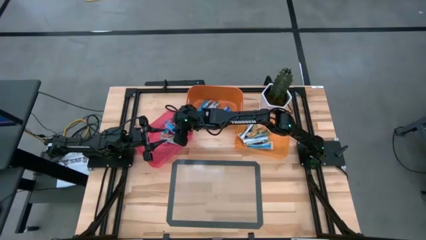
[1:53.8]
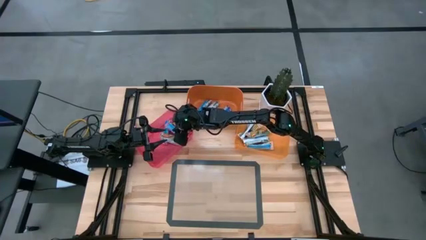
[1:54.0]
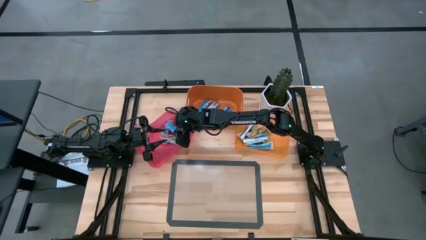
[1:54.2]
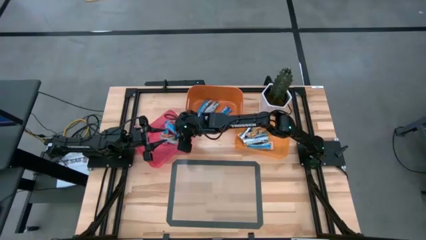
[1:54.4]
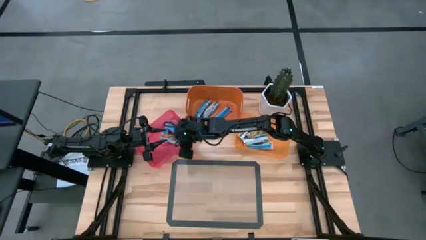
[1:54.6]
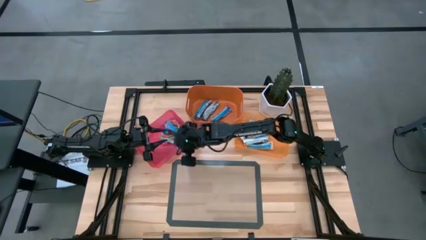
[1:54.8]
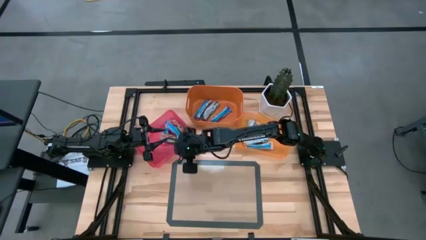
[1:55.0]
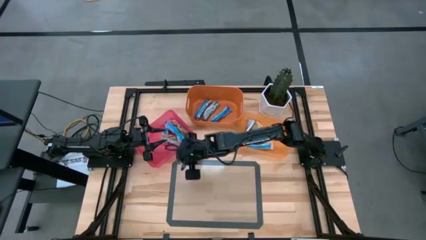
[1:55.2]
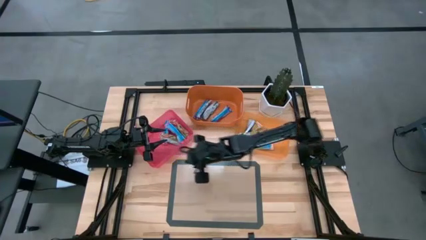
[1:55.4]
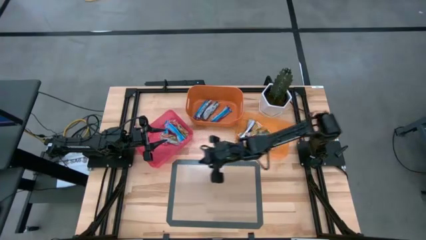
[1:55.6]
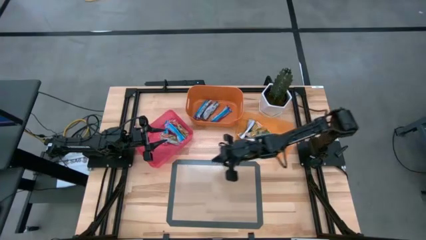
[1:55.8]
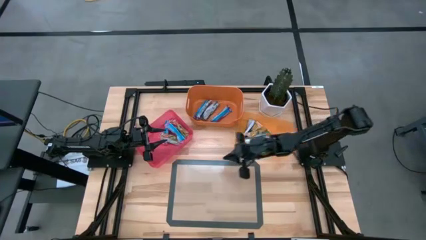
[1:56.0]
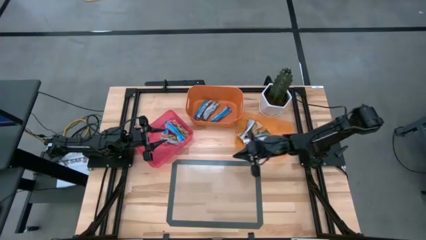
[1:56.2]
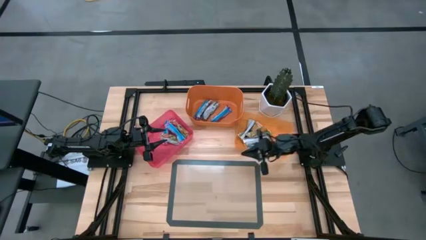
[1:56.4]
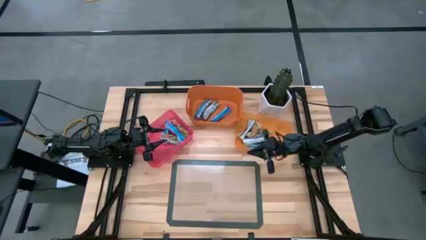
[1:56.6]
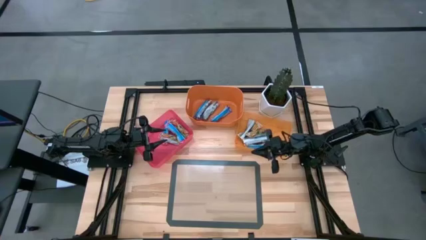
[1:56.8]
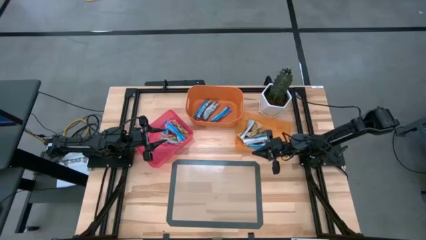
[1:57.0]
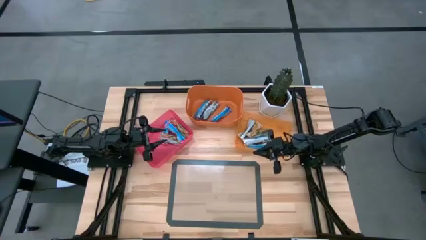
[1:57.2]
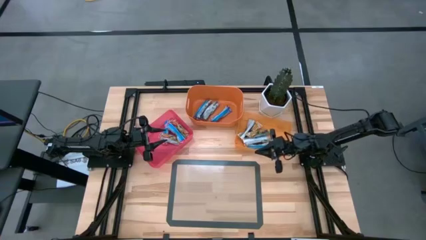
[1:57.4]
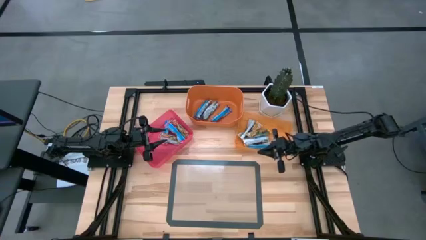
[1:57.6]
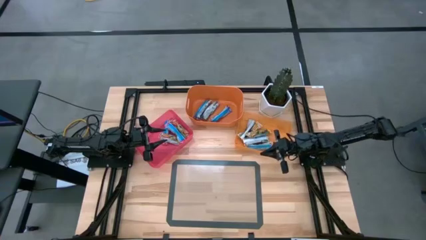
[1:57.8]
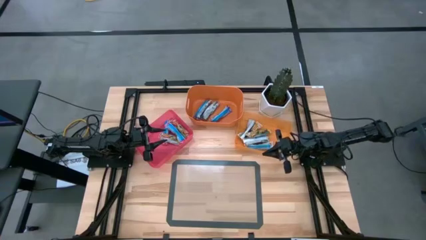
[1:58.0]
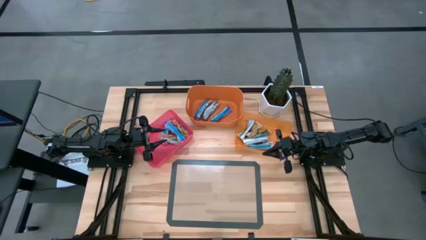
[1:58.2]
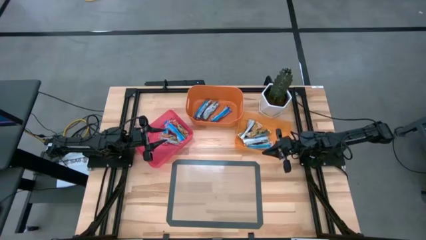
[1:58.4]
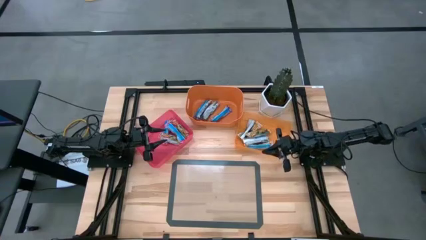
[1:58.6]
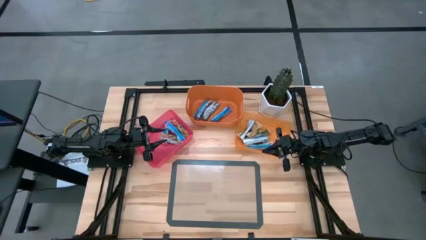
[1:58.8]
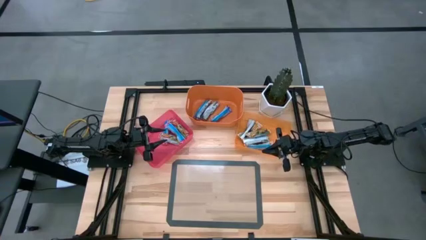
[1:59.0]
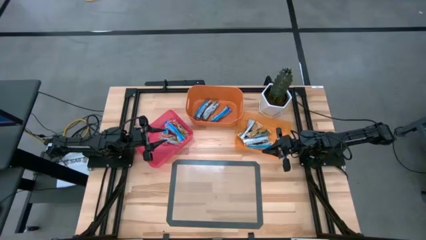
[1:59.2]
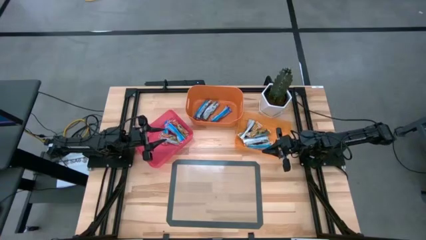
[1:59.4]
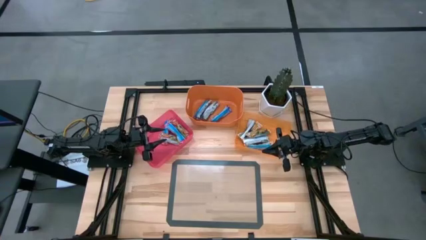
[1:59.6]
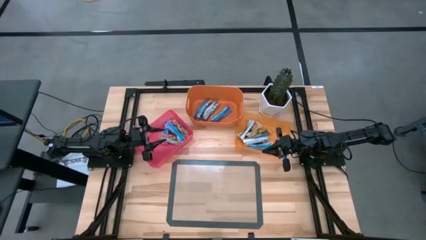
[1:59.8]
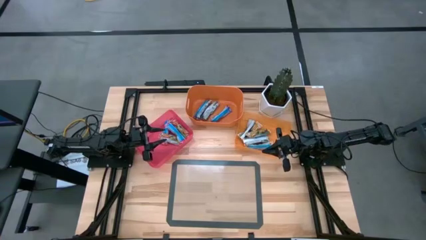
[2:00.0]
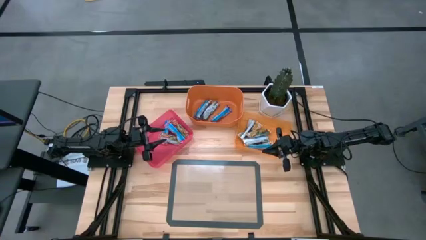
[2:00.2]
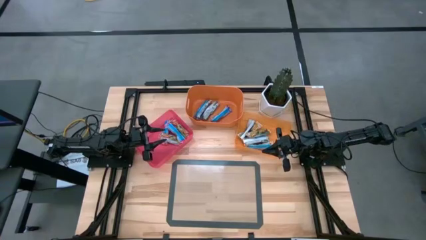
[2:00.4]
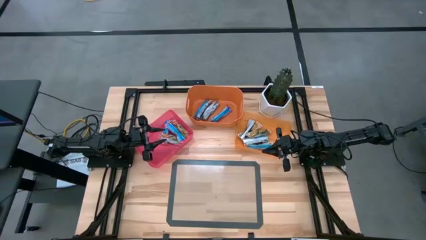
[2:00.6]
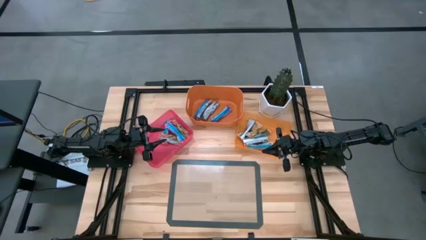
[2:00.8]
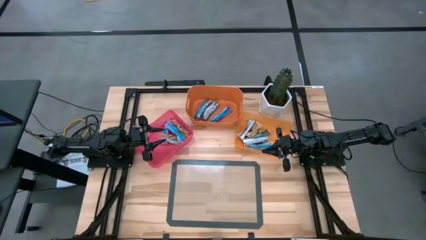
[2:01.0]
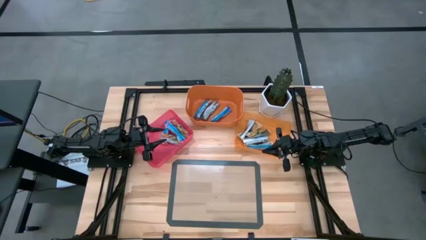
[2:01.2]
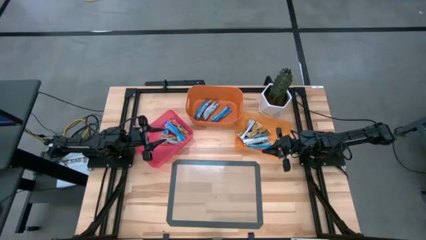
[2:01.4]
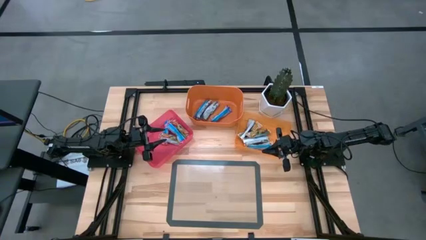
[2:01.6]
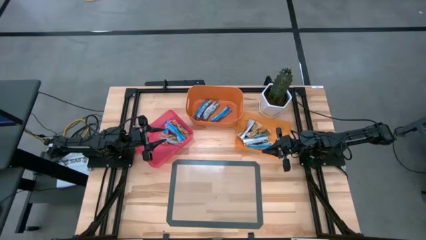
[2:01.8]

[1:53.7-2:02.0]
Task: Pick and place Granola Bars by type
Return to Home Position

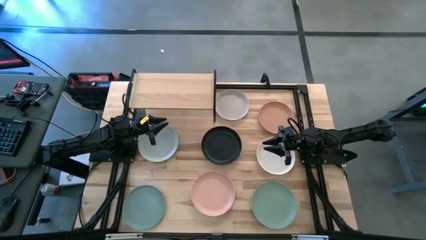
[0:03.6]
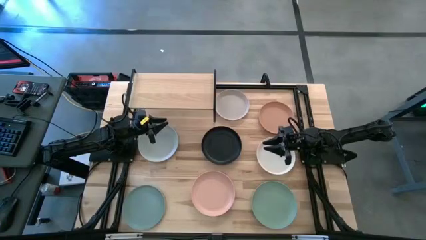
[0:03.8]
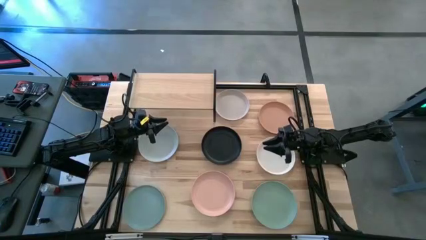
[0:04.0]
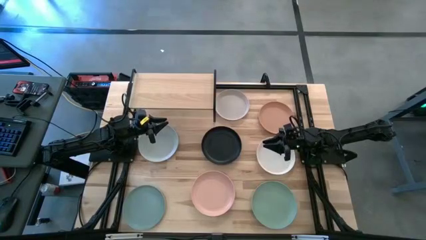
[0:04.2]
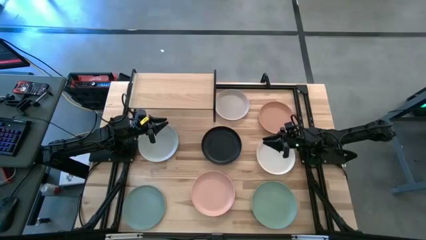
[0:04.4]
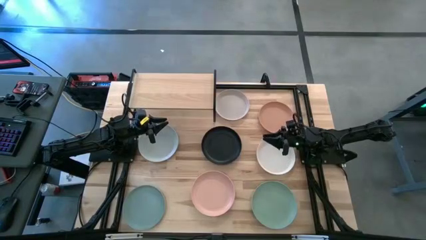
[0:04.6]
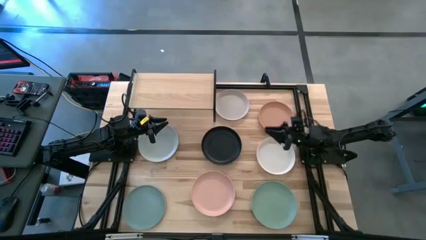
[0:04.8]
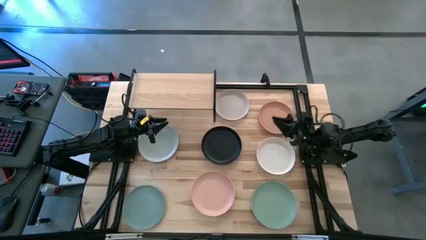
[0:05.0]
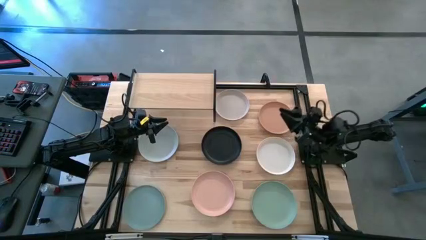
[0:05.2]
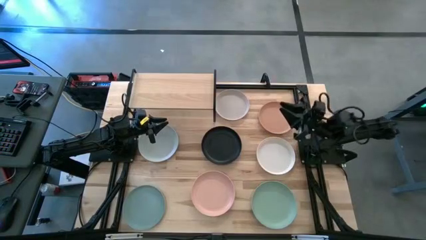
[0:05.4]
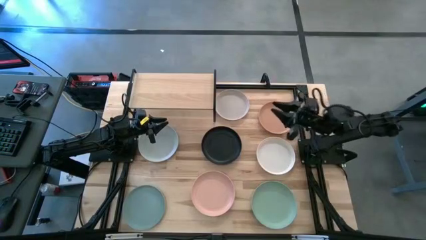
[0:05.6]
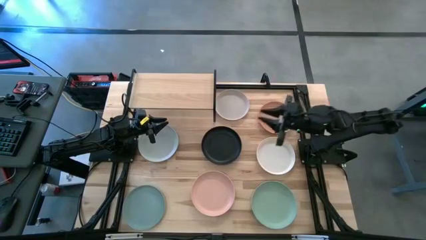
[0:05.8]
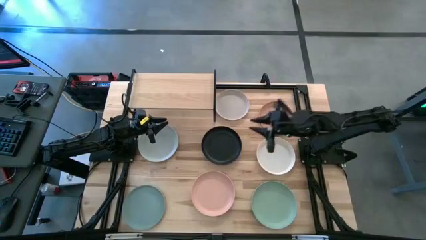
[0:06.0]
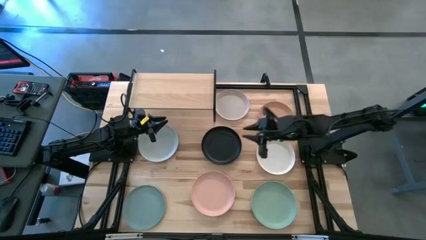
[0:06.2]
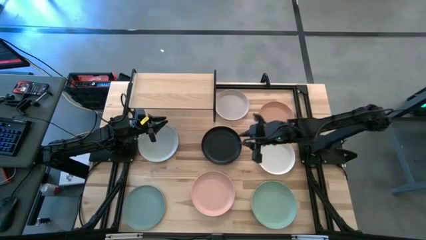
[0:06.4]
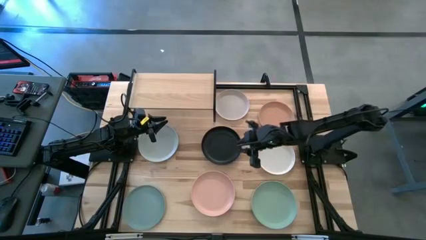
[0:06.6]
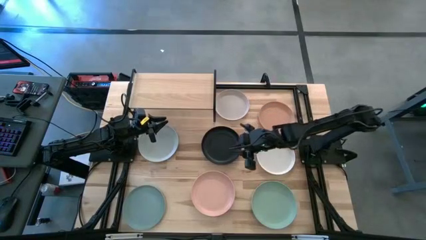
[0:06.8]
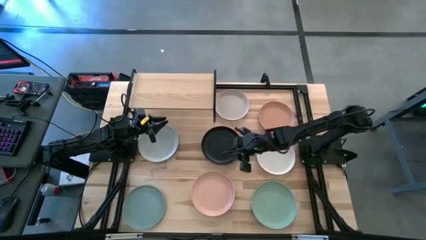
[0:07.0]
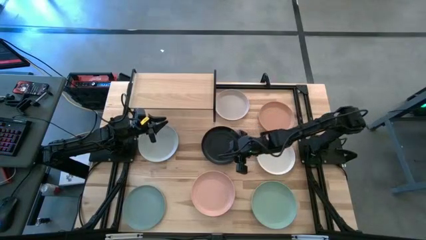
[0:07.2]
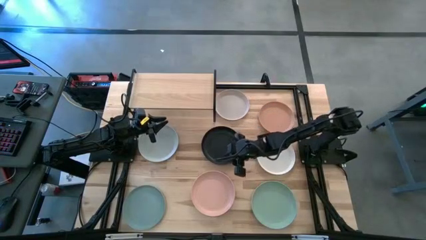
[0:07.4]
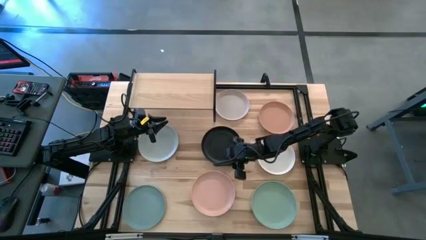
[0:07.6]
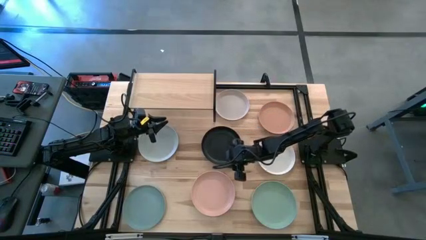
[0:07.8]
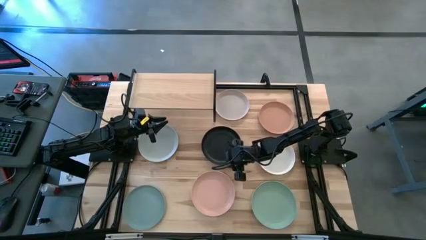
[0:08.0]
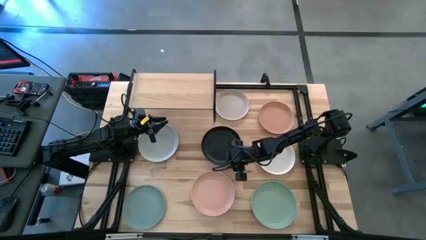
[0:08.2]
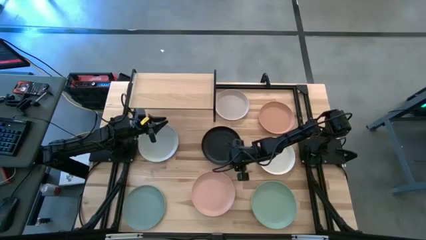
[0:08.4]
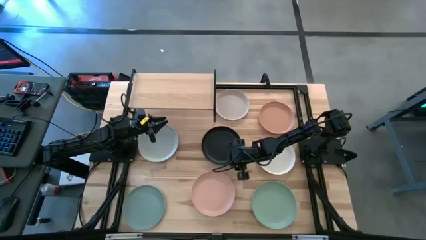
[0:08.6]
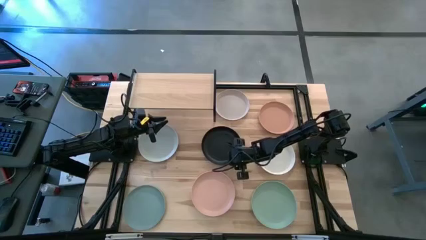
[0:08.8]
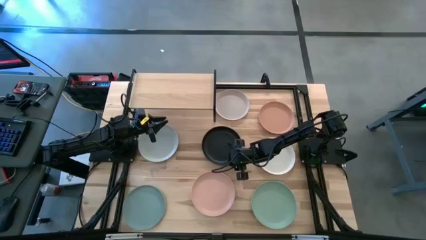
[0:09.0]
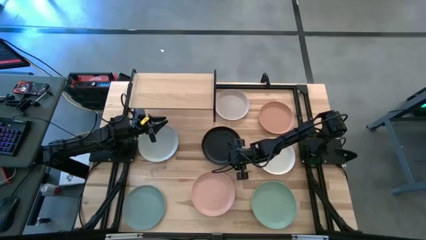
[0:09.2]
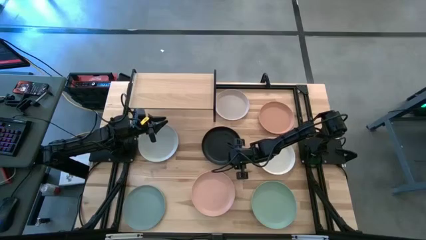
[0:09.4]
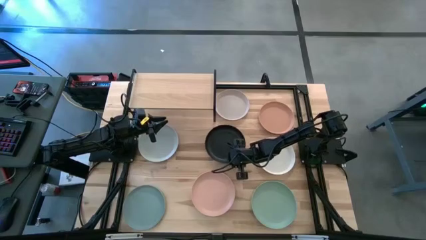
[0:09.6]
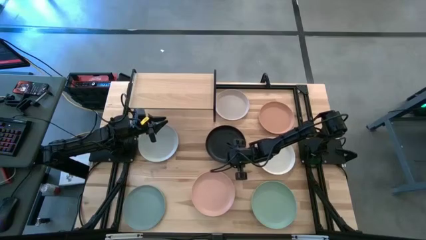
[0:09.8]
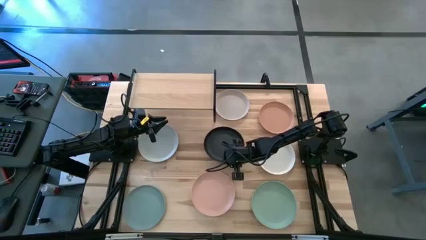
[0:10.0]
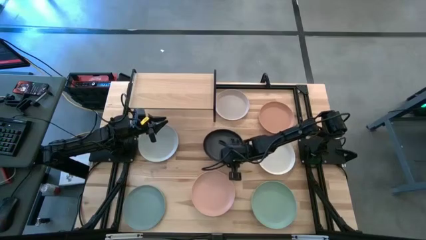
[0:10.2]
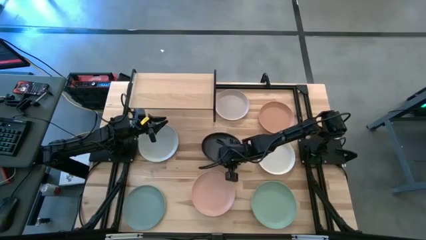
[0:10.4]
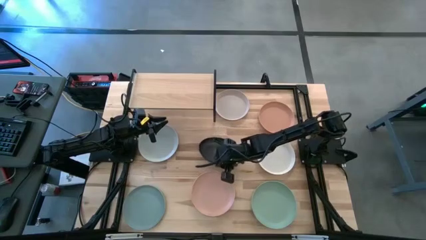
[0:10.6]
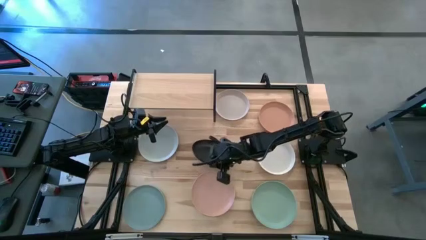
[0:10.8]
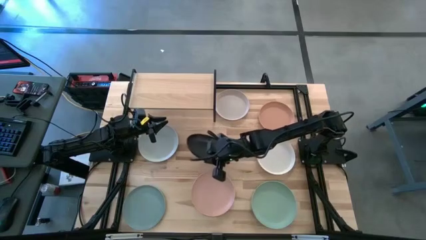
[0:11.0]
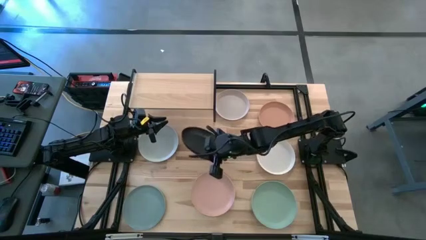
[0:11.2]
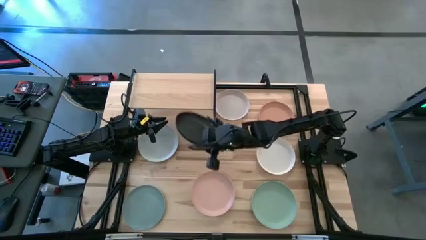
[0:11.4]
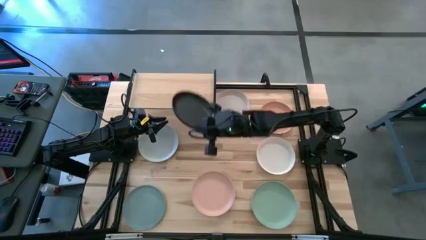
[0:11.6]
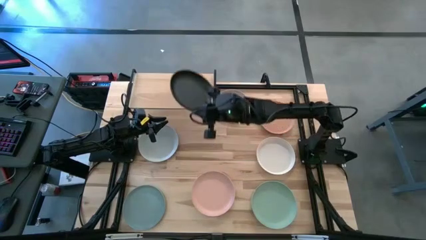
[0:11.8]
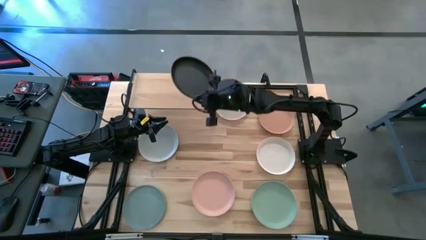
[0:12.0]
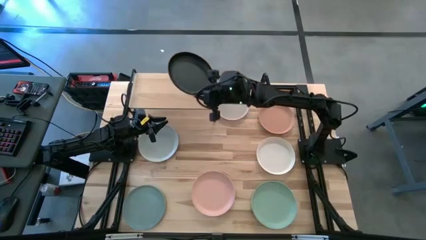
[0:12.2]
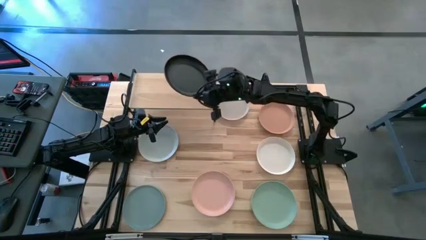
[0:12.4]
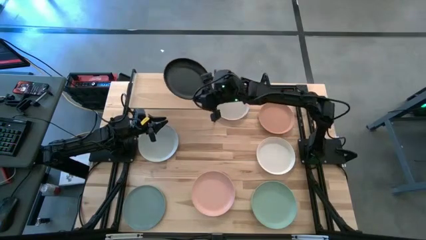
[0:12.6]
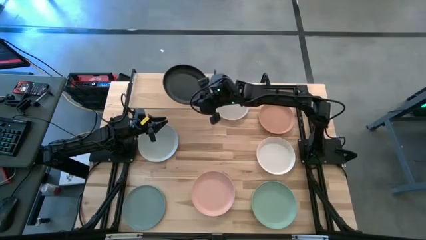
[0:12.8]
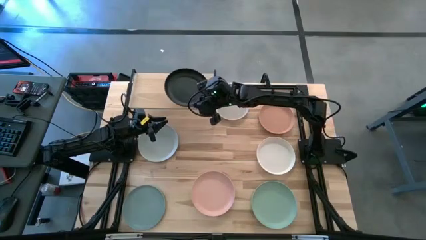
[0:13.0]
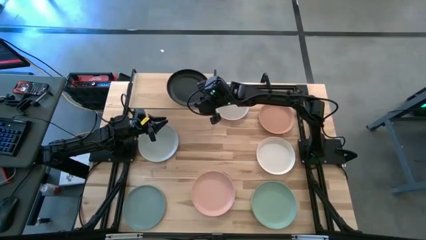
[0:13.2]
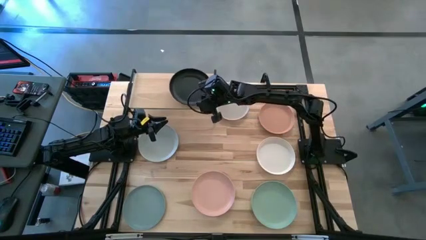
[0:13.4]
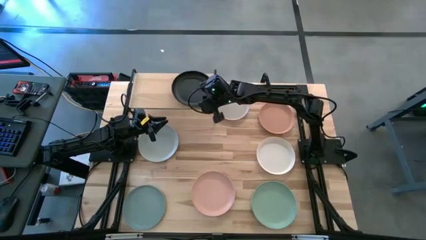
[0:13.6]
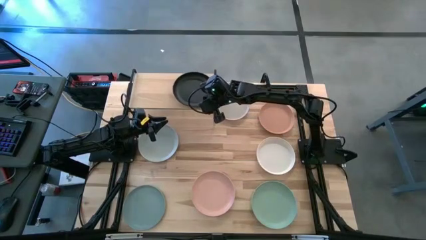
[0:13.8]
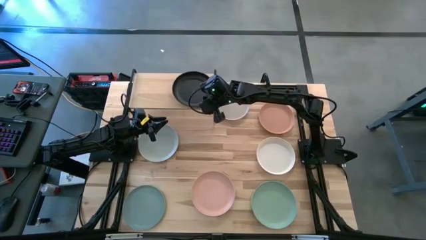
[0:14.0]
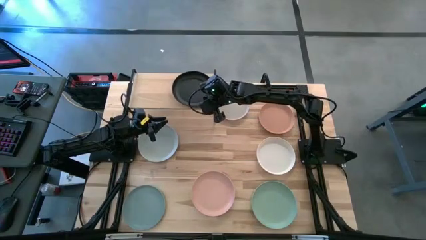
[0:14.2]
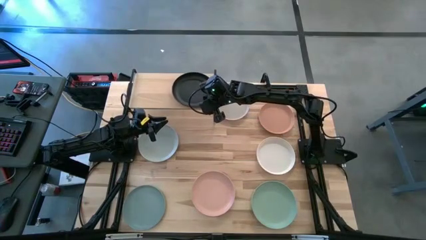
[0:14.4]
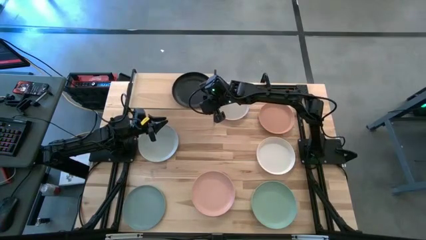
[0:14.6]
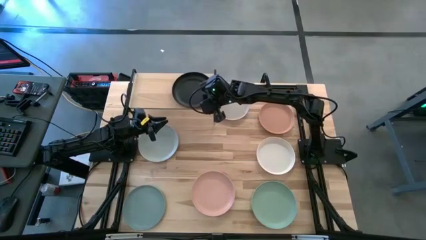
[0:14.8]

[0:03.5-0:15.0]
Task: Place and stack plates onto a shelf
Put the black plate on the shelf
